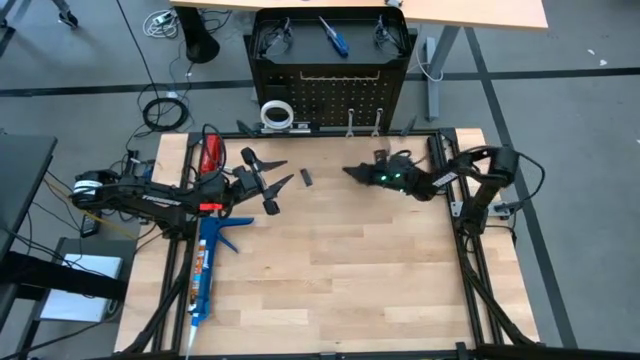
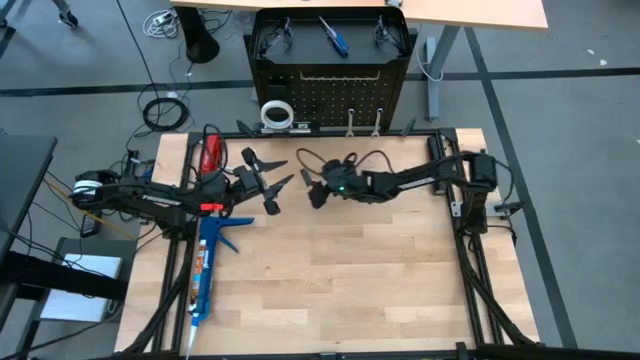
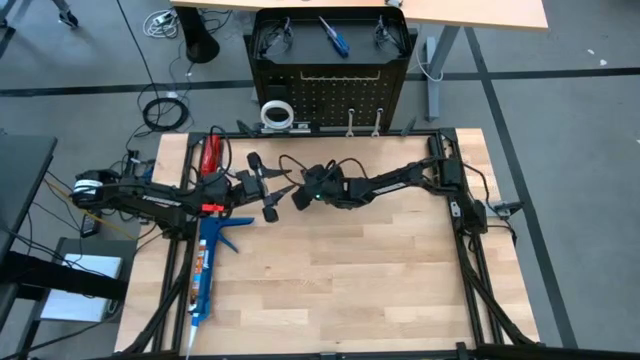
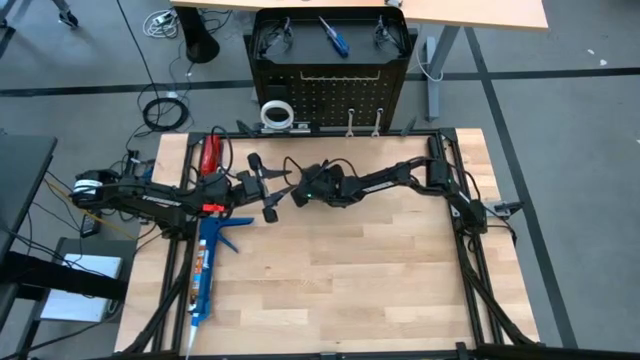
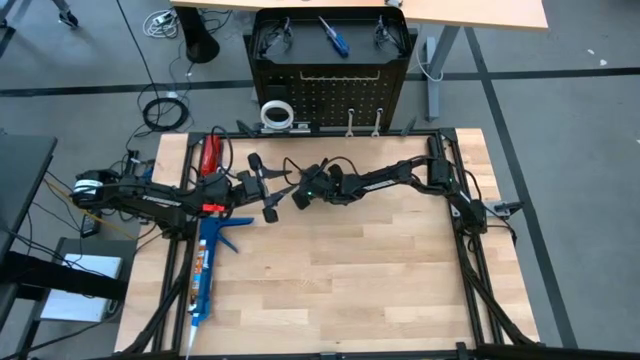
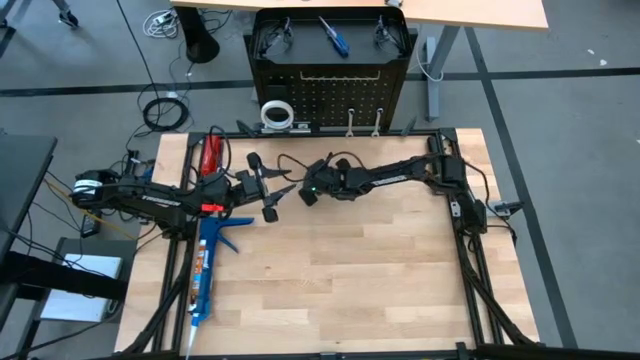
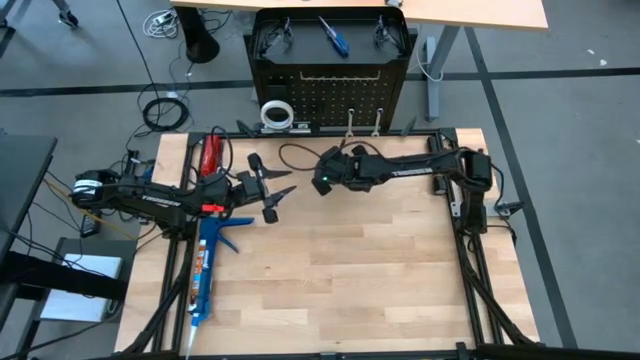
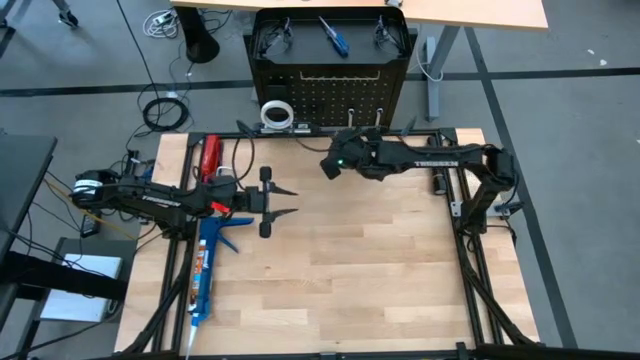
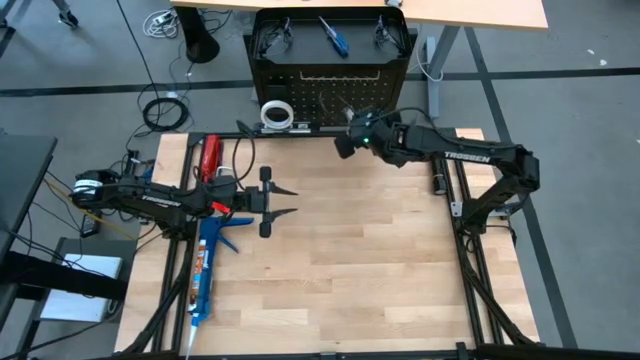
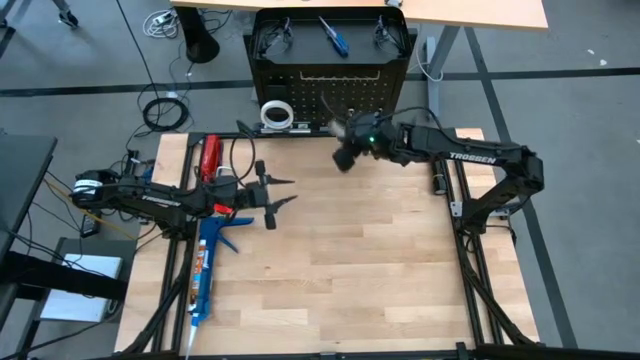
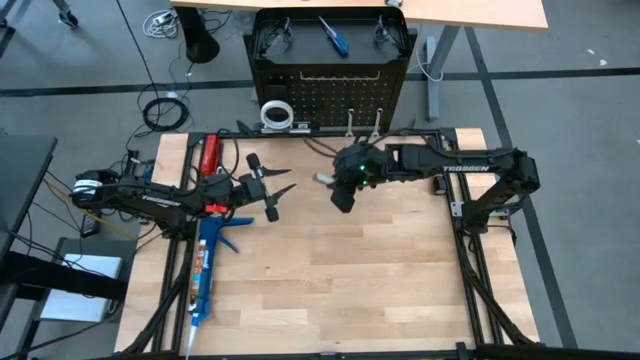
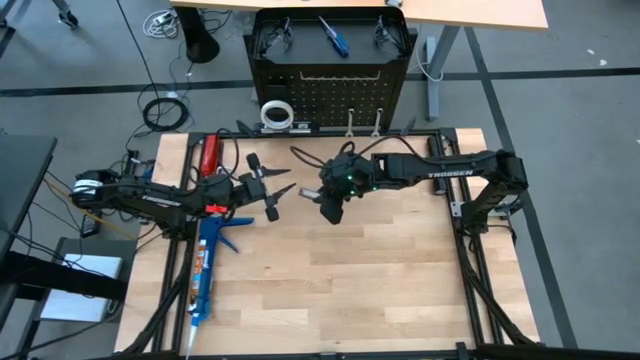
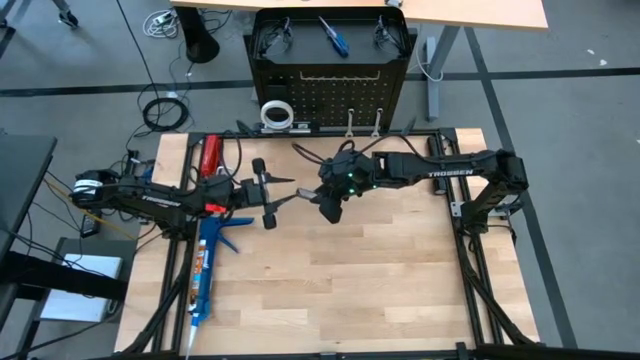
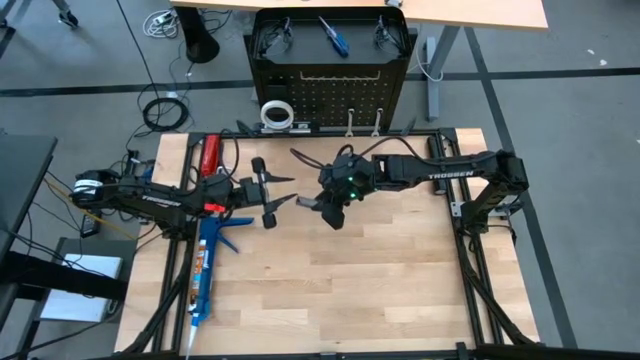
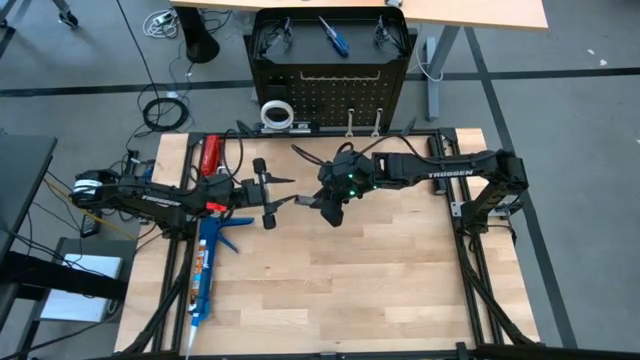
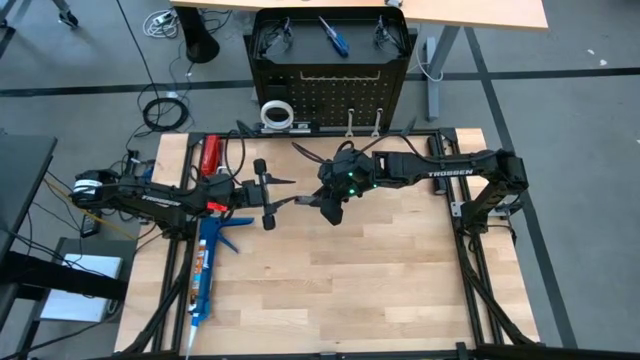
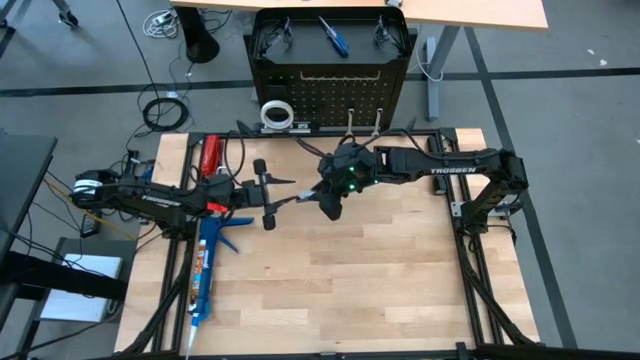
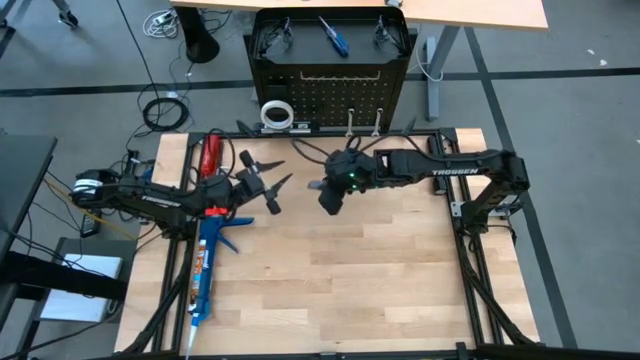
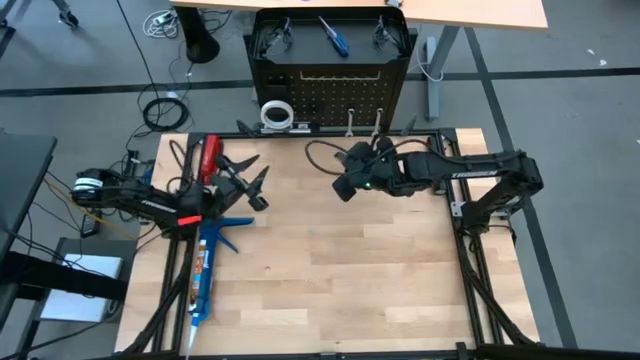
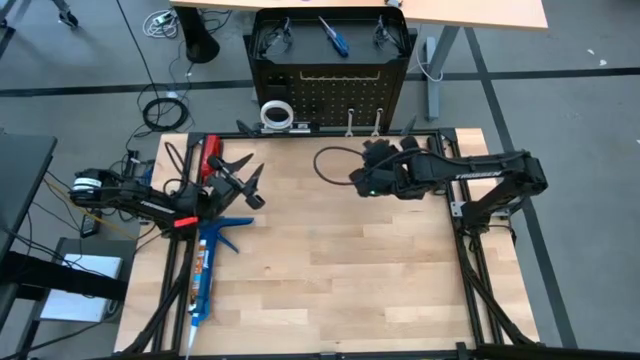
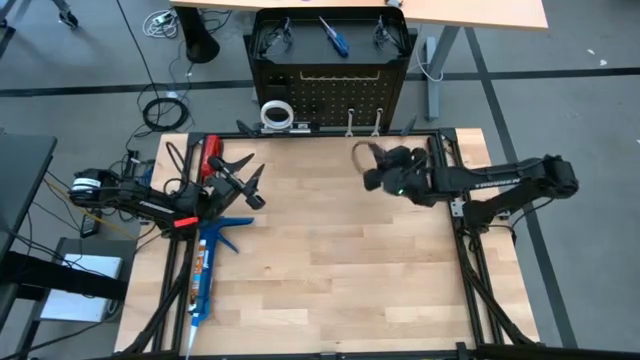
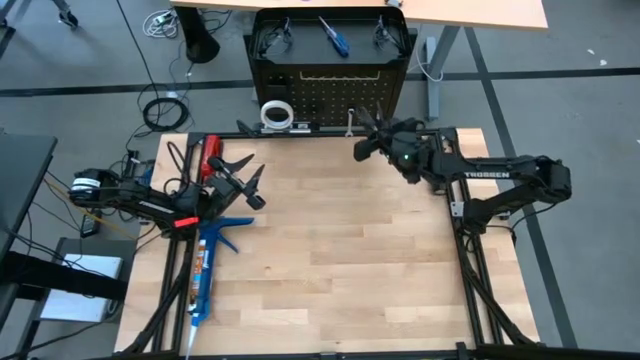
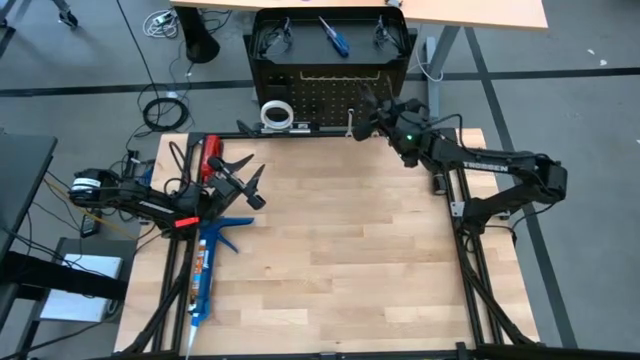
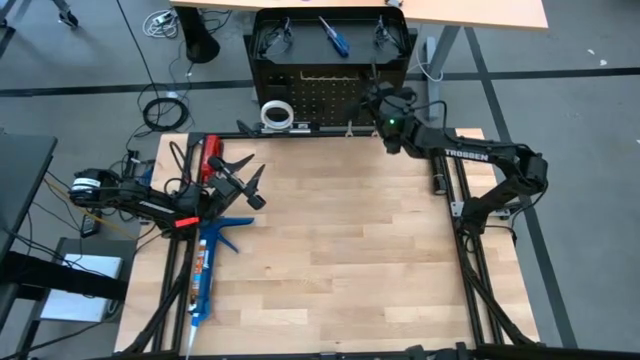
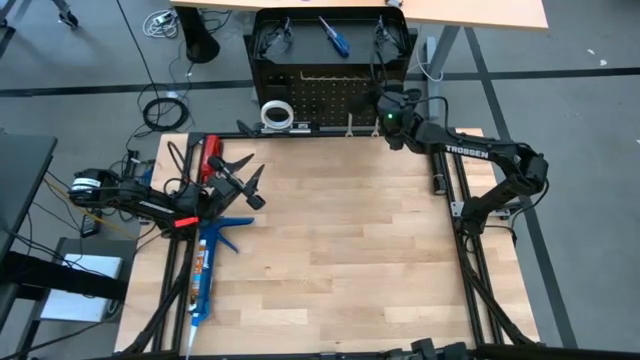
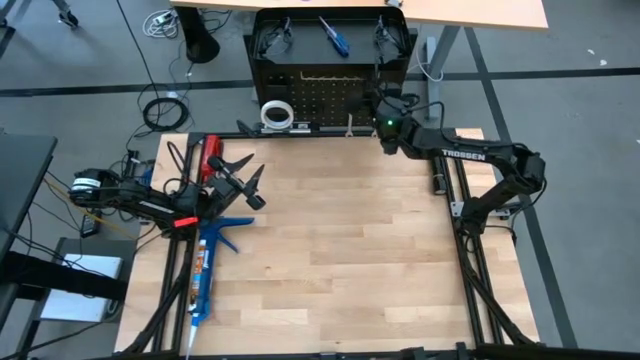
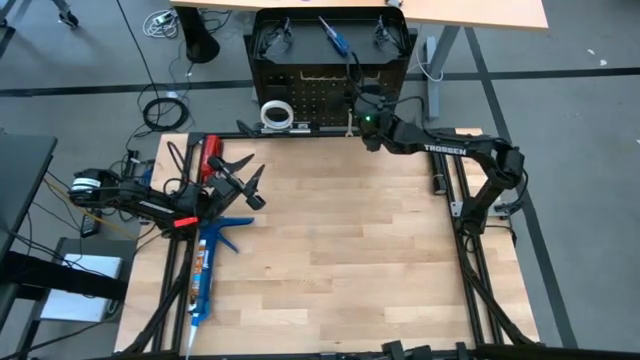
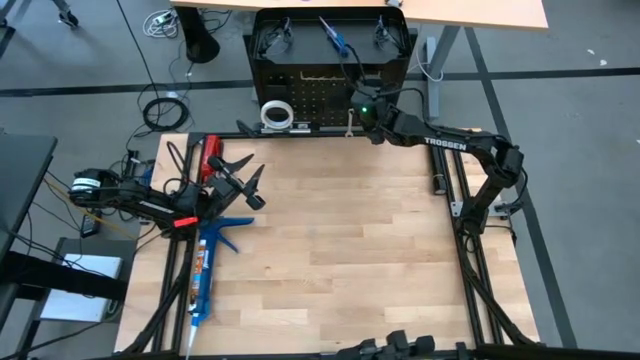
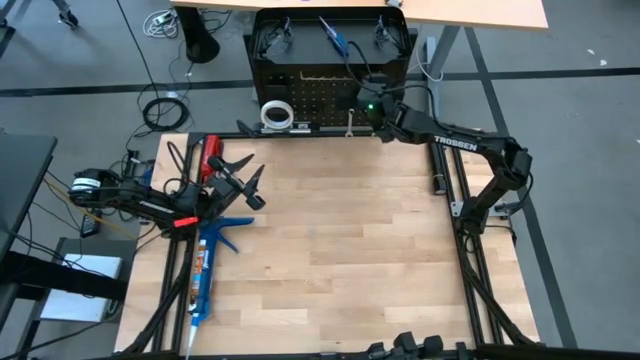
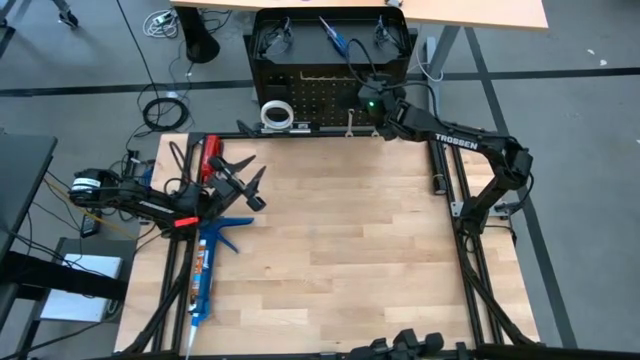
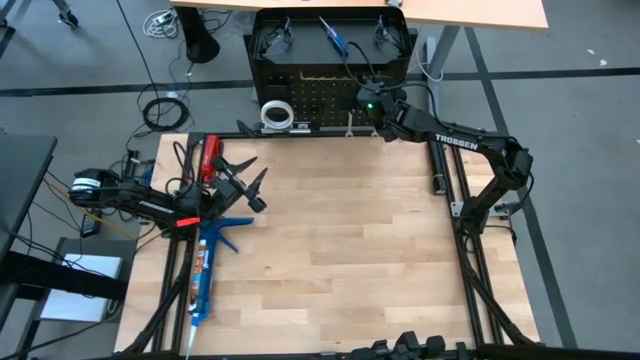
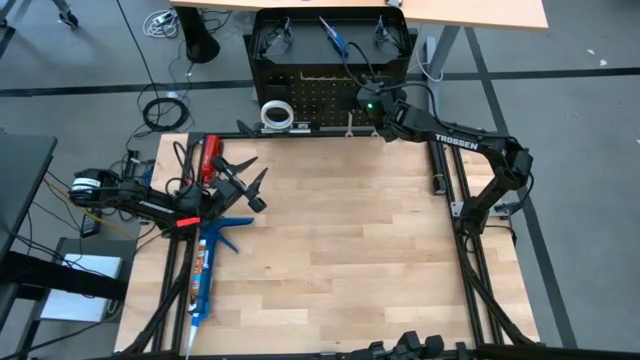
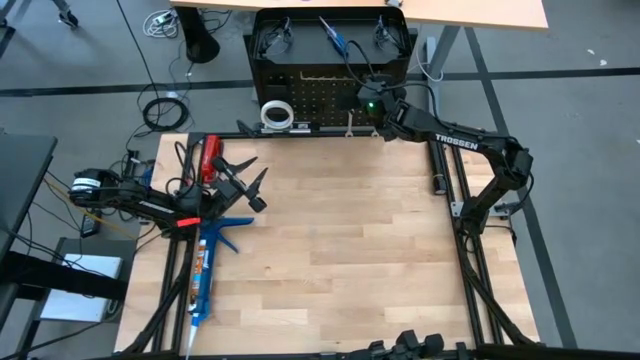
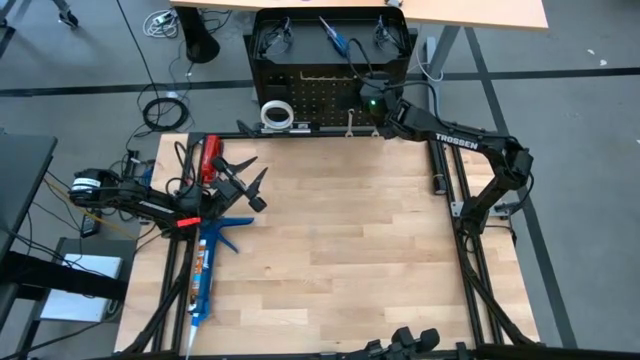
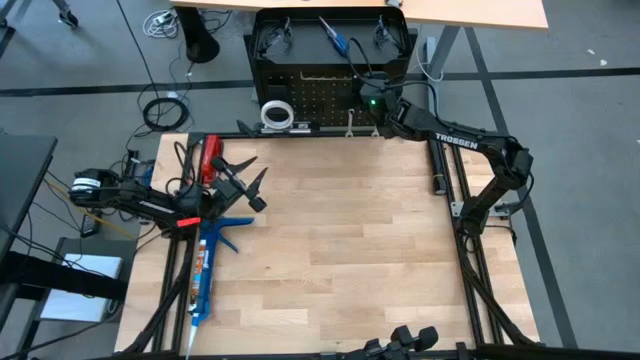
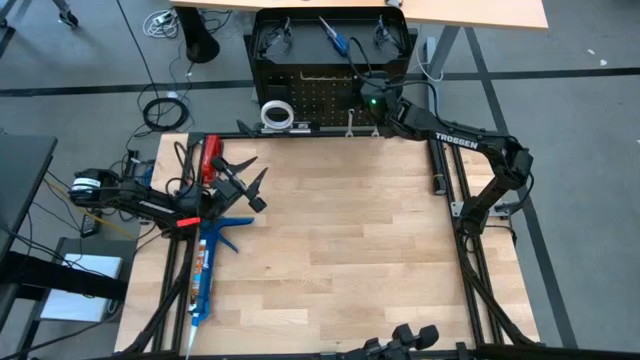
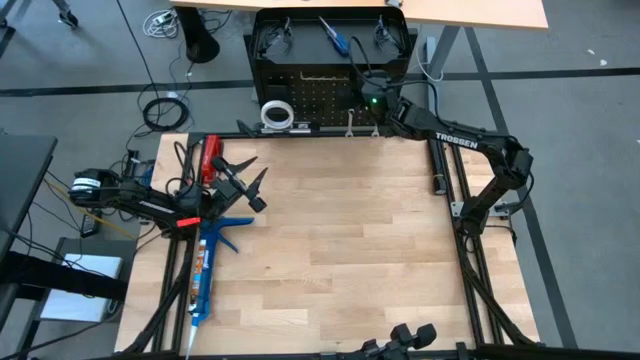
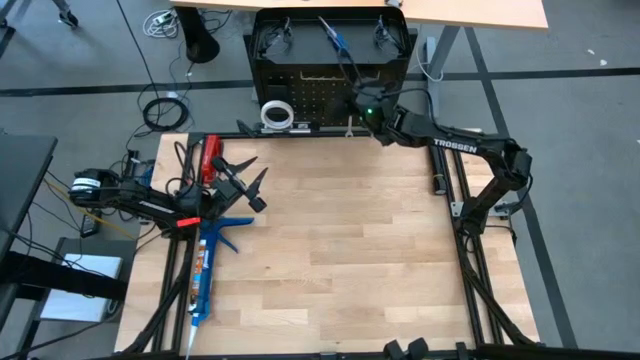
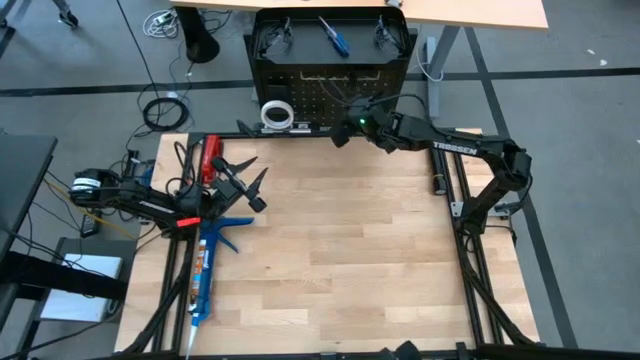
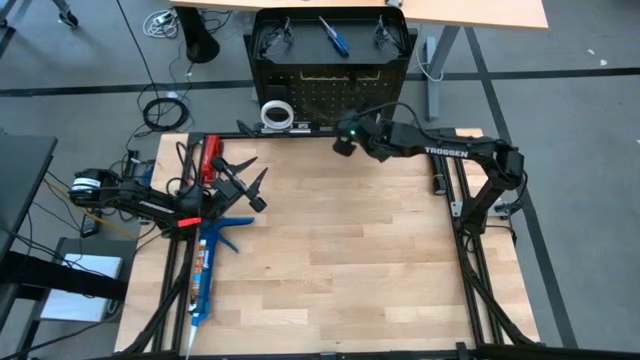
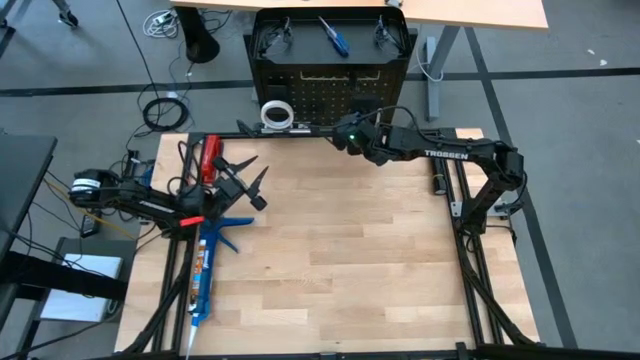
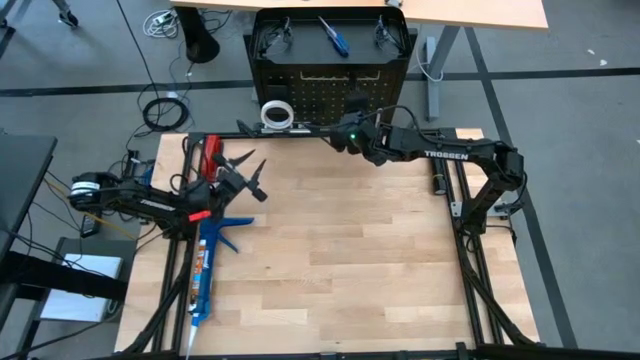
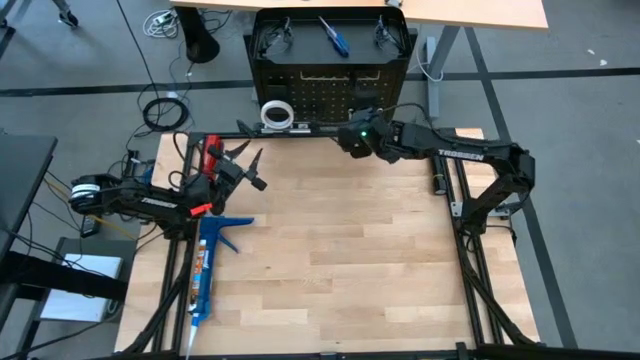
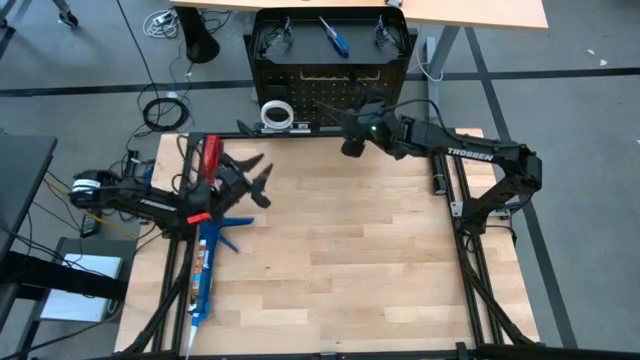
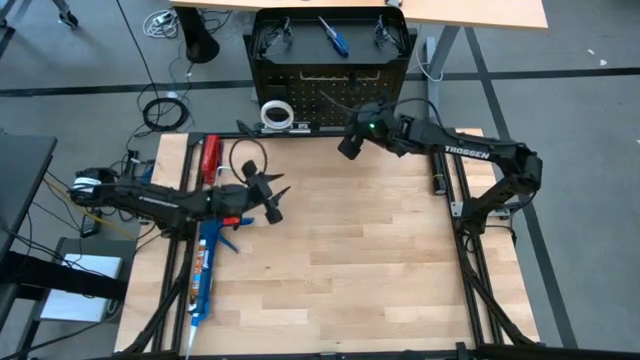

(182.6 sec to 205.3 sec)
Task: Hang tools onto peg board
Put the black utility knife blade dispenser onto the black pegboard
